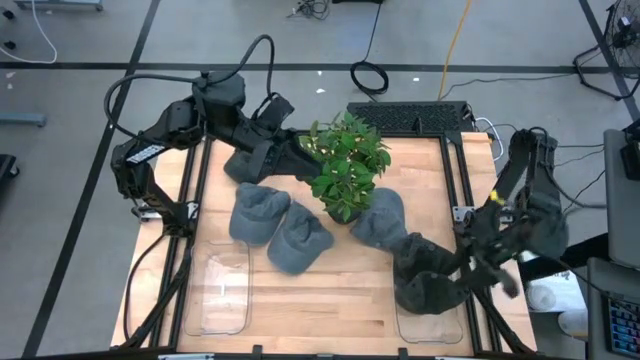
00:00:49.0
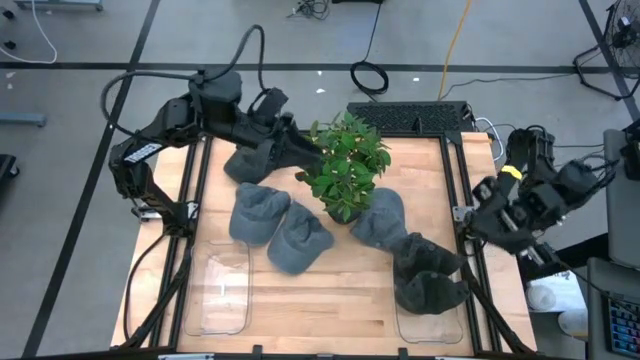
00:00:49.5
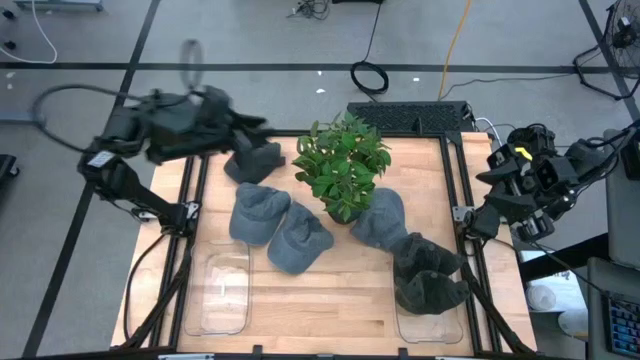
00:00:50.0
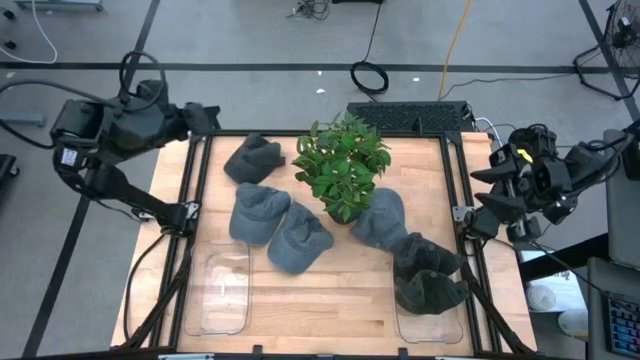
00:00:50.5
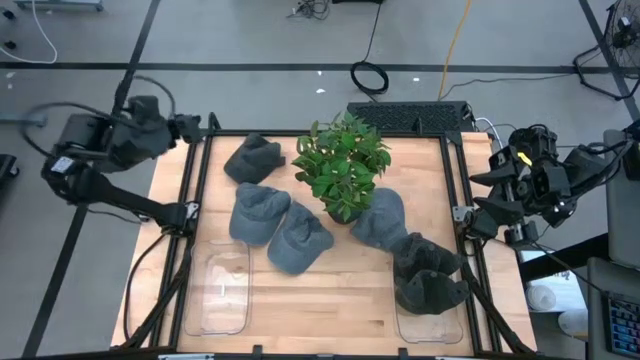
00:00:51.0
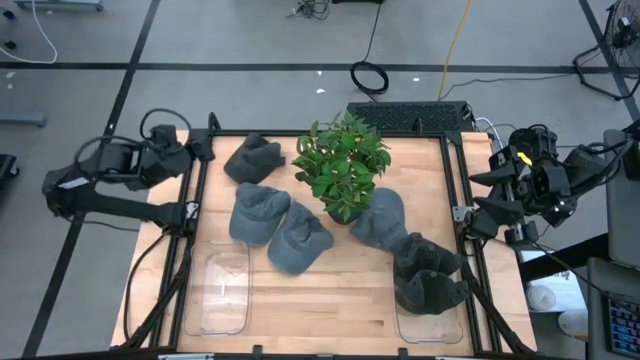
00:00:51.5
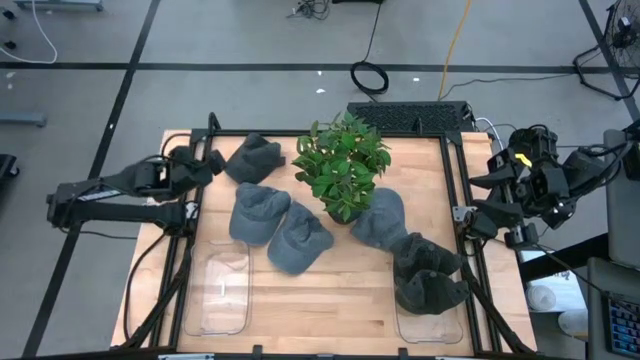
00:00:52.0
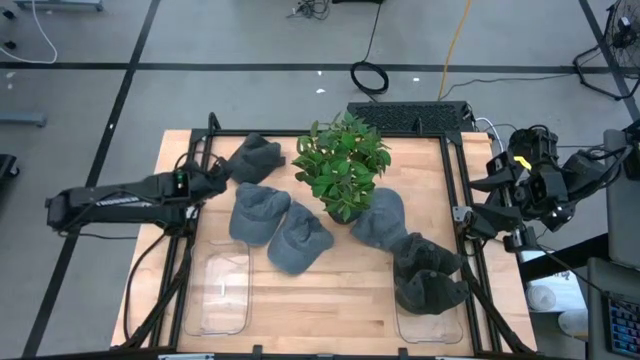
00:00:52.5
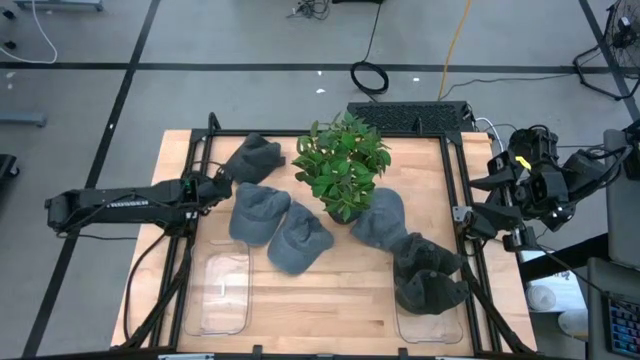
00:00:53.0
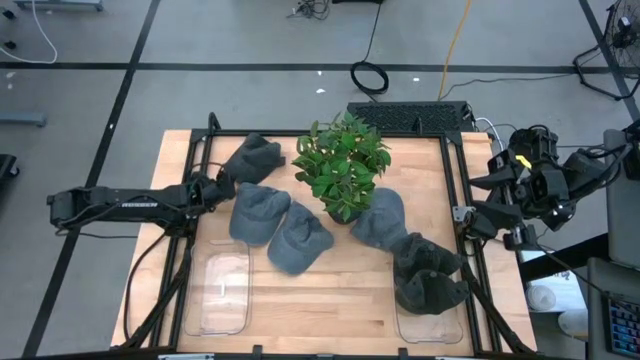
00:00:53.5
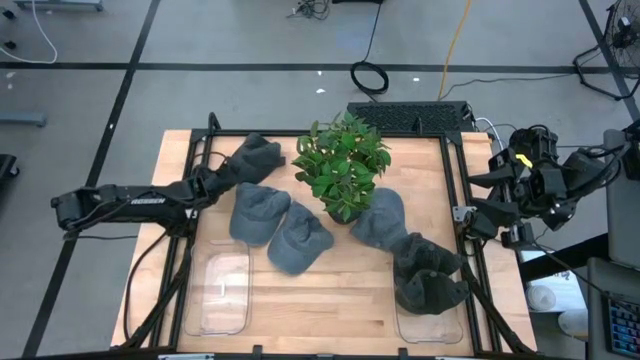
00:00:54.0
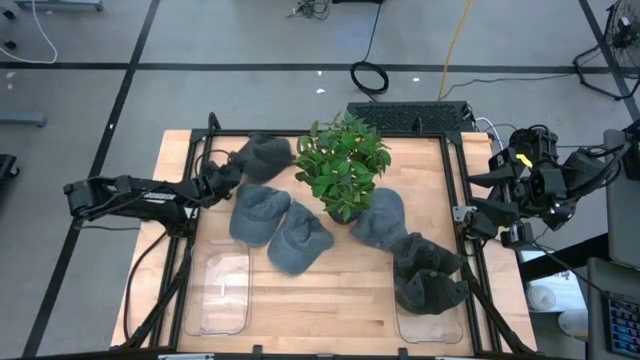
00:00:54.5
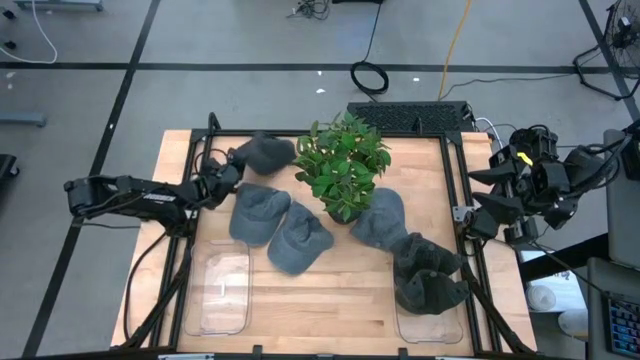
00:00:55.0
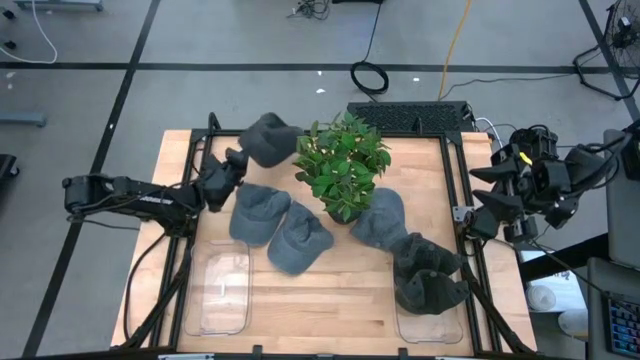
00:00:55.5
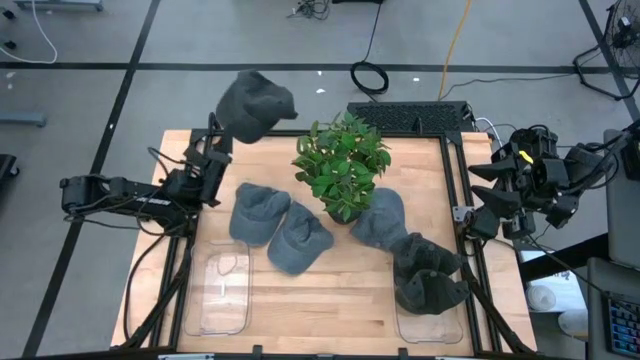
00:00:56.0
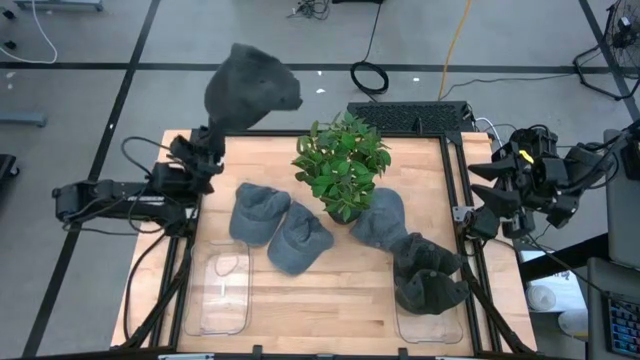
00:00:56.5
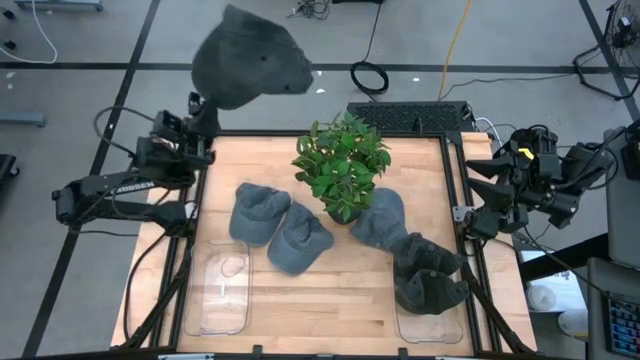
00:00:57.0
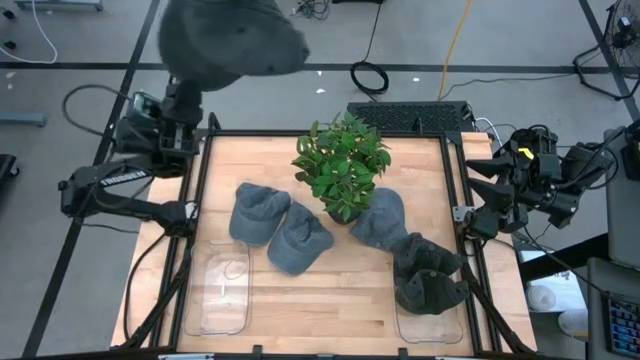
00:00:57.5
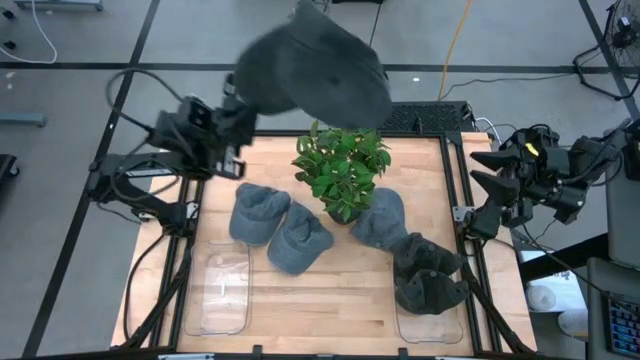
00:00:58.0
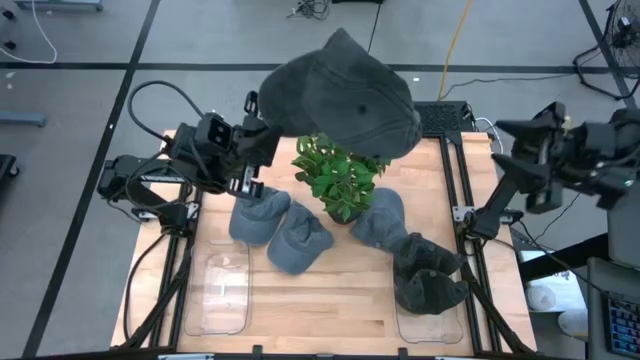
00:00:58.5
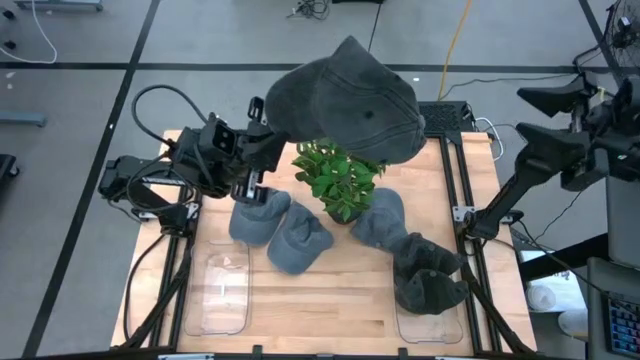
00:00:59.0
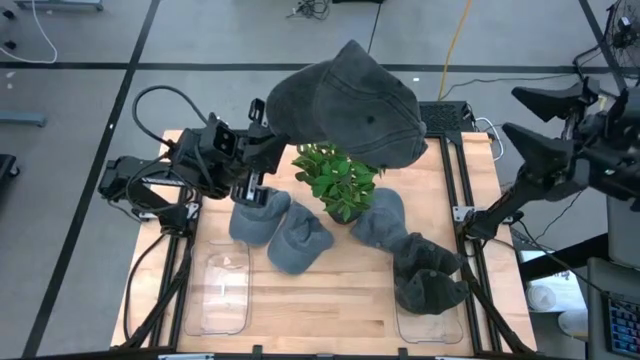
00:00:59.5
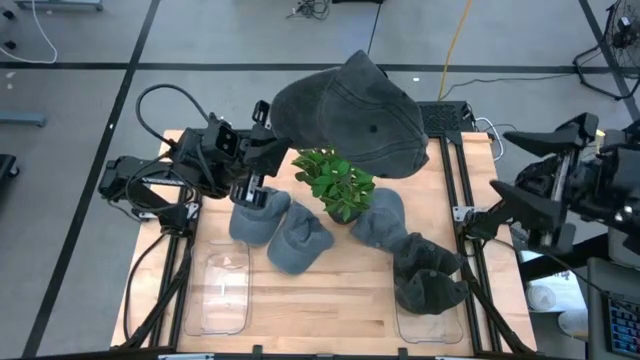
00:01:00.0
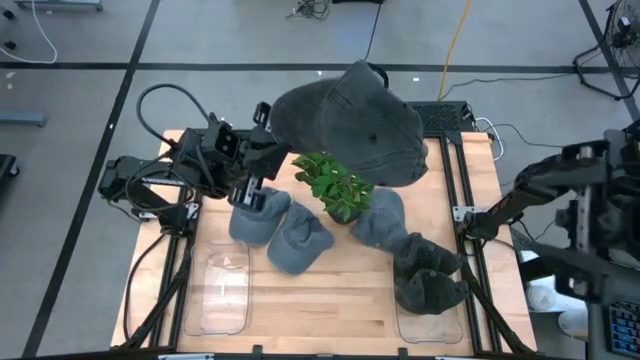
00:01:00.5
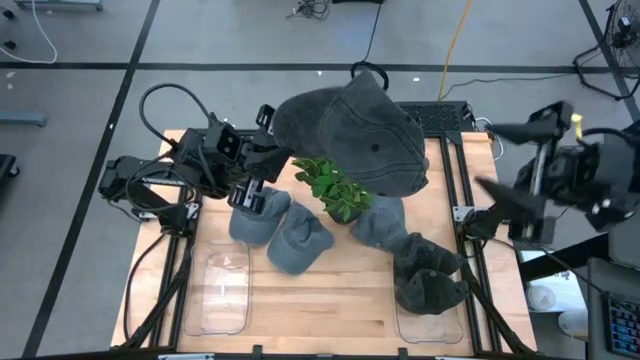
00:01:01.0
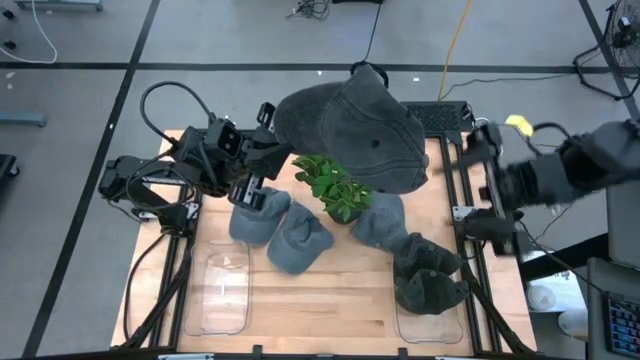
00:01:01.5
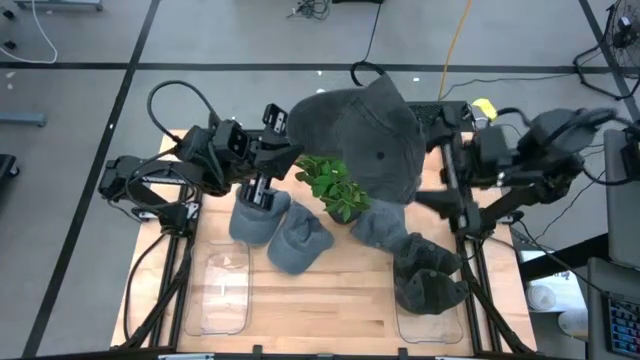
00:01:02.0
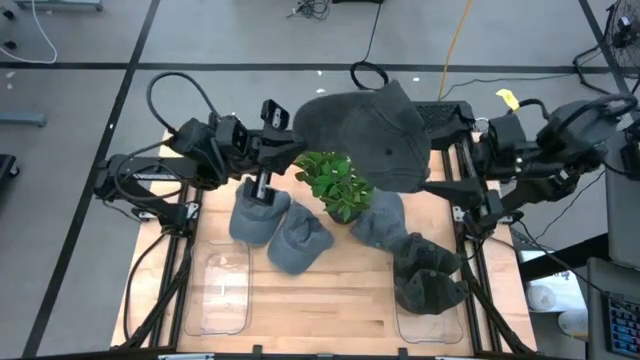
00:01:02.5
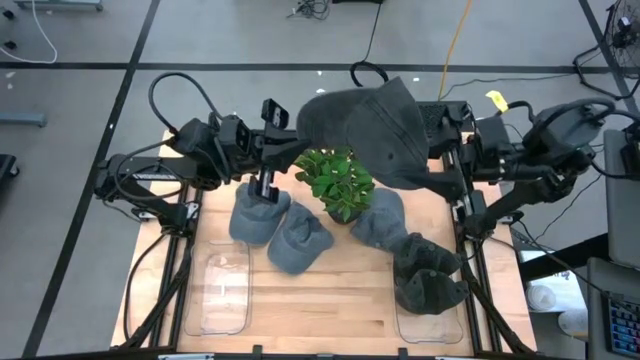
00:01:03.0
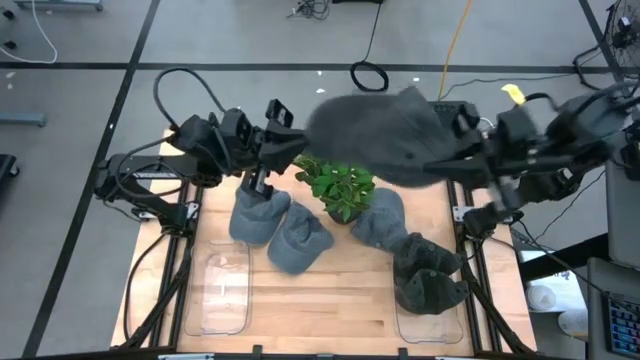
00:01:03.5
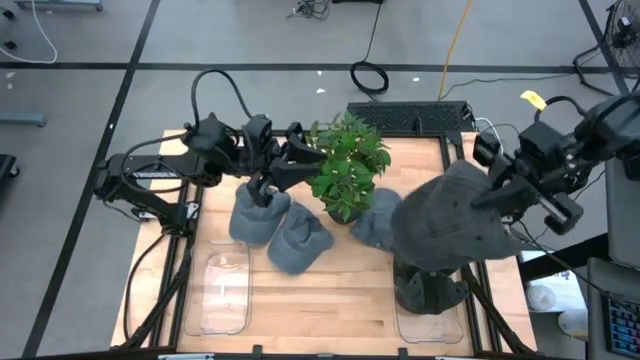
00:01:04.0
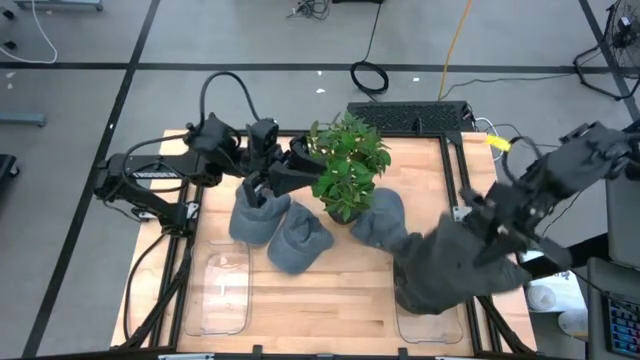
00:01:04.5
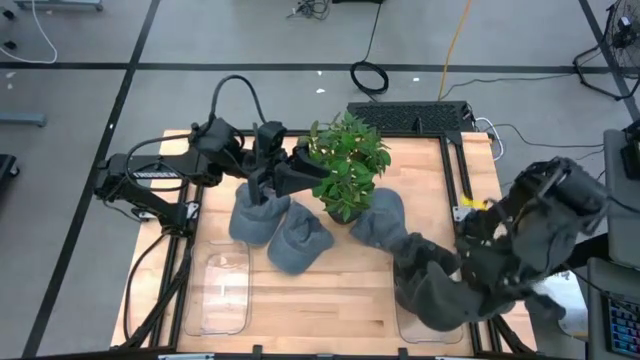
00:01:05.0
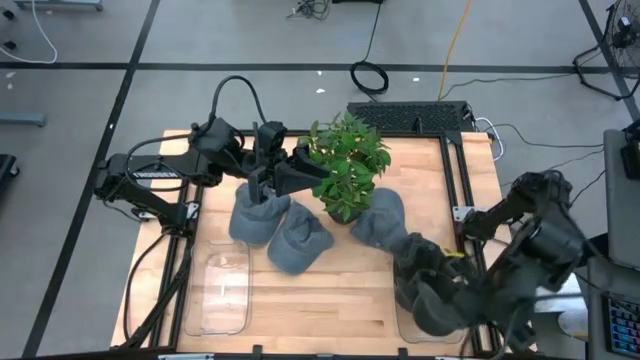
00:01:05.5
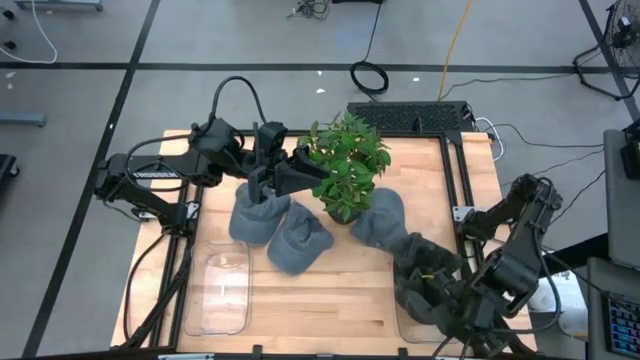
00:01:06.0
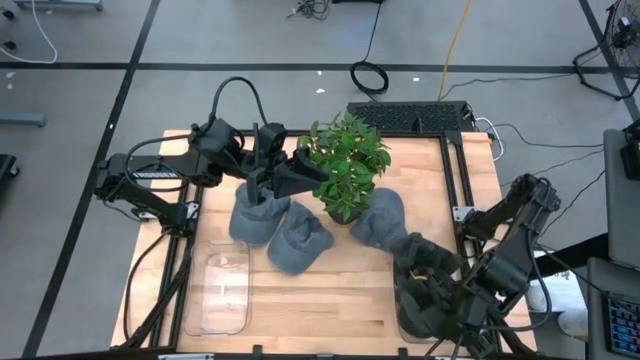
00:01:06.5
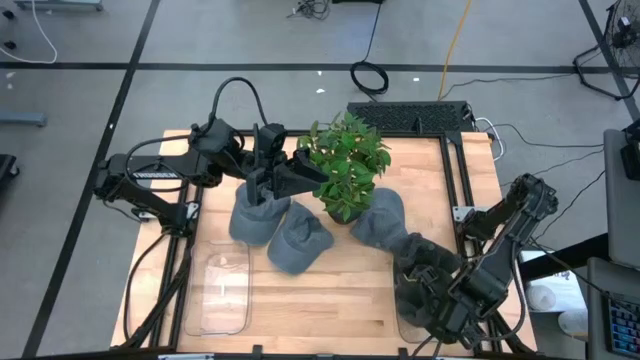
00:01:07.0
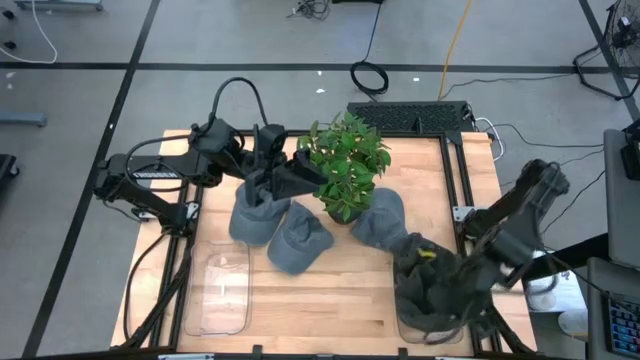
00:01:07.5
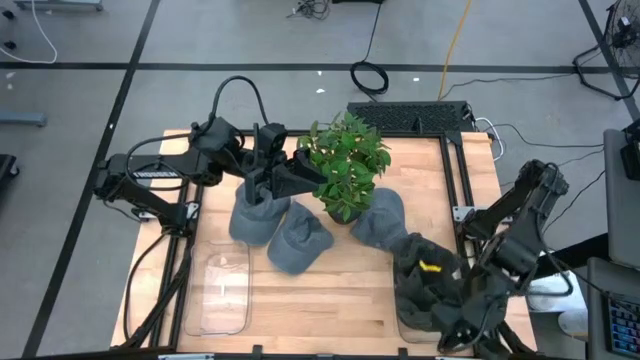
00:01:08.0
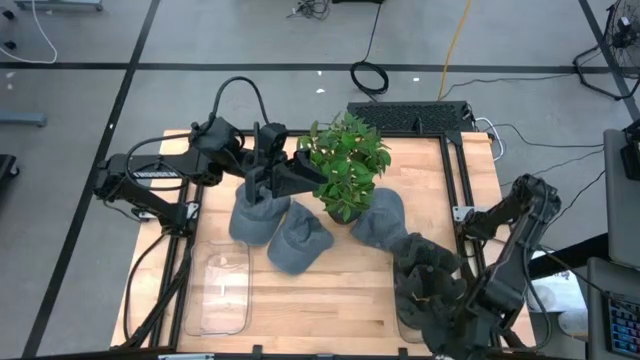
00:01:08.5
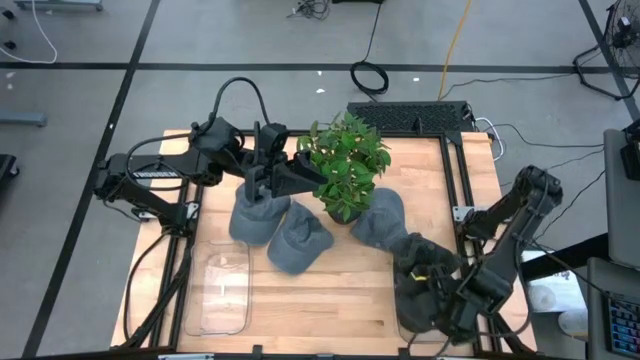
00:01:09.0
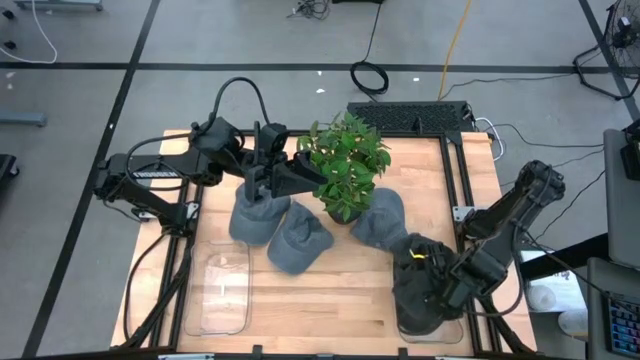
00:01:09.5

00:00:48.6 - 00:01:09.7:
Task: Pick & Place hat
Put the black cap into the right transparent bin
